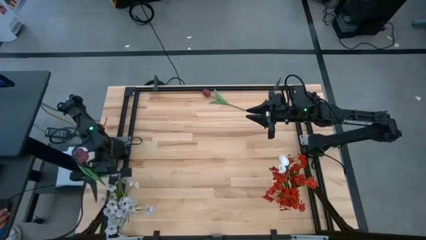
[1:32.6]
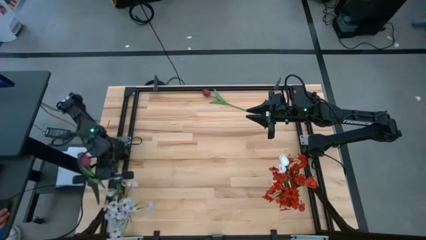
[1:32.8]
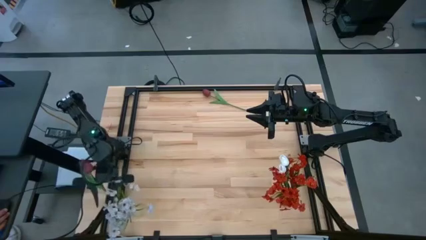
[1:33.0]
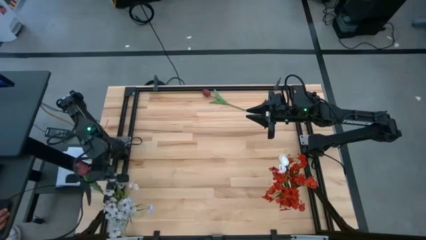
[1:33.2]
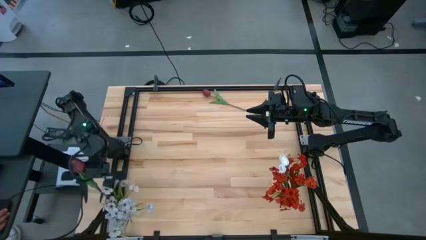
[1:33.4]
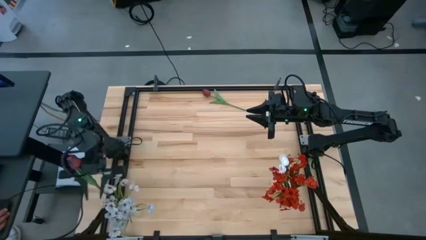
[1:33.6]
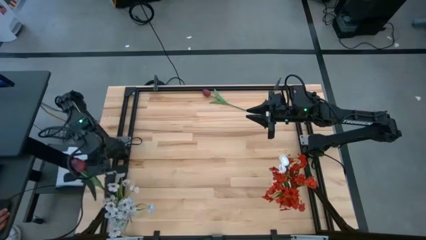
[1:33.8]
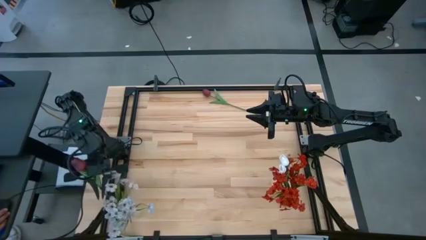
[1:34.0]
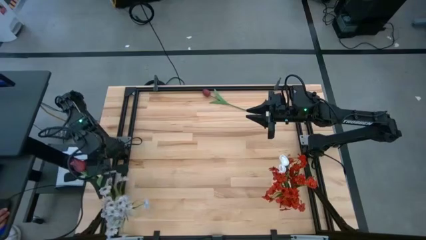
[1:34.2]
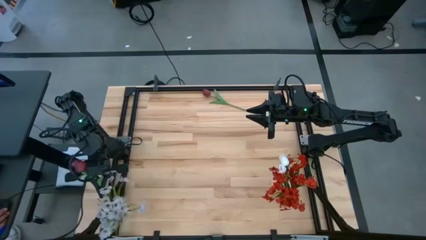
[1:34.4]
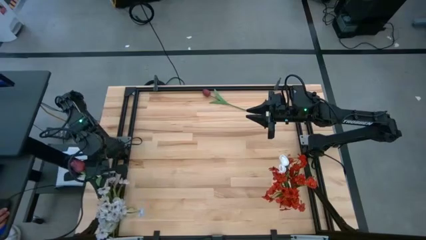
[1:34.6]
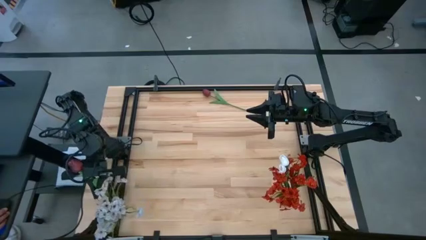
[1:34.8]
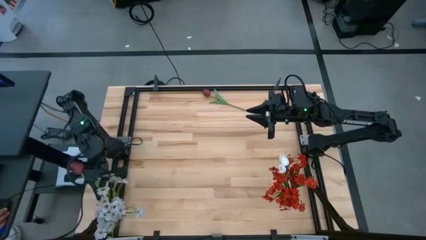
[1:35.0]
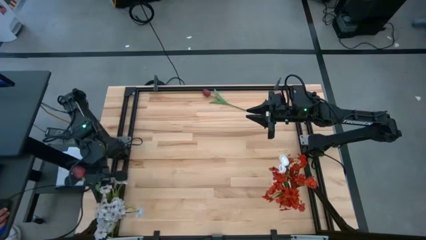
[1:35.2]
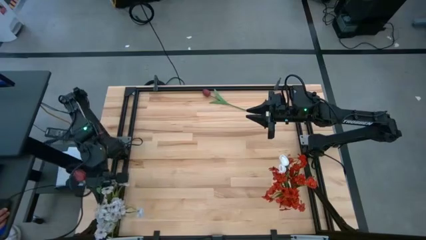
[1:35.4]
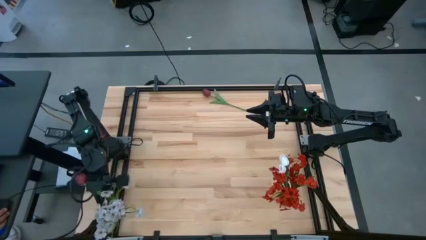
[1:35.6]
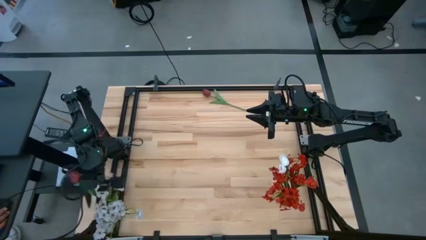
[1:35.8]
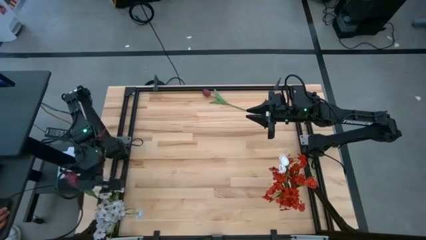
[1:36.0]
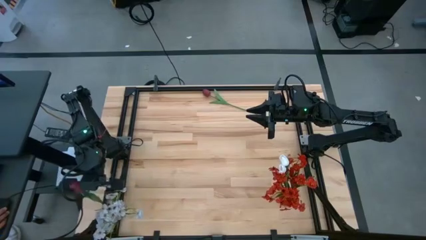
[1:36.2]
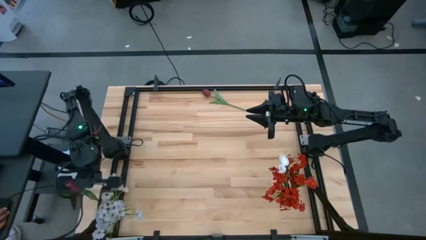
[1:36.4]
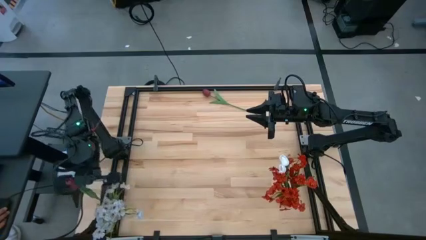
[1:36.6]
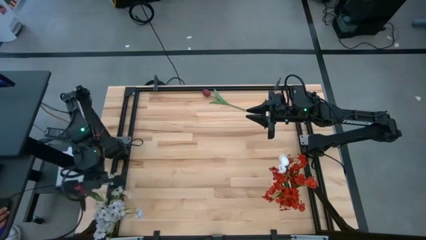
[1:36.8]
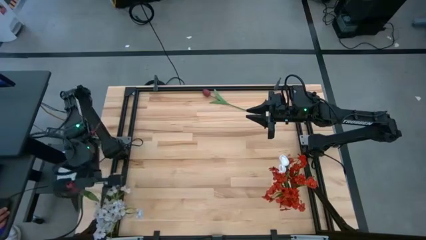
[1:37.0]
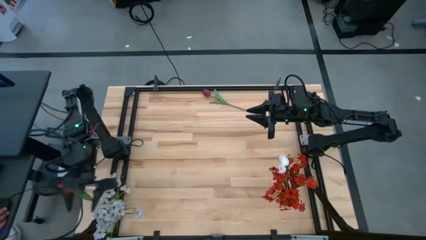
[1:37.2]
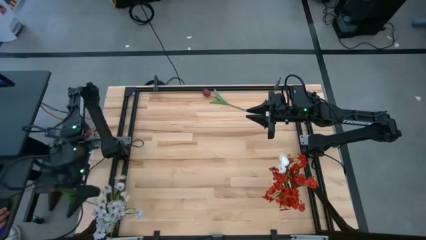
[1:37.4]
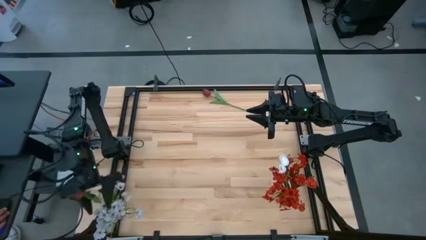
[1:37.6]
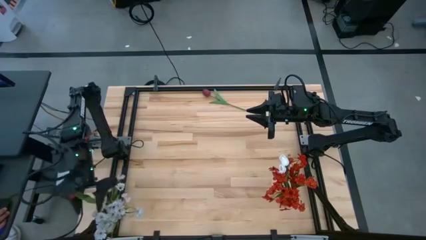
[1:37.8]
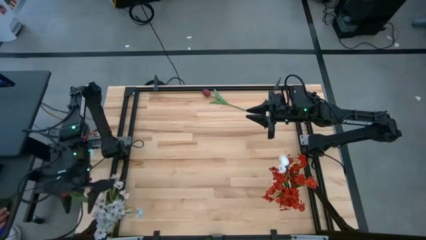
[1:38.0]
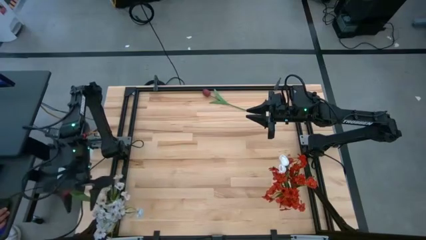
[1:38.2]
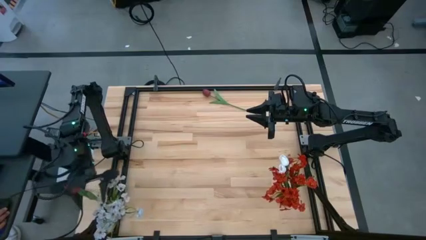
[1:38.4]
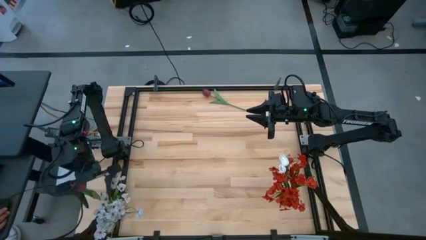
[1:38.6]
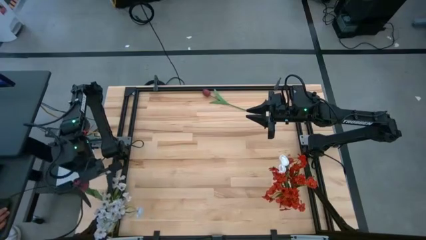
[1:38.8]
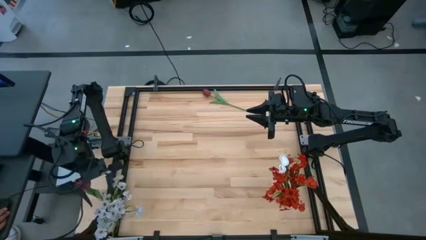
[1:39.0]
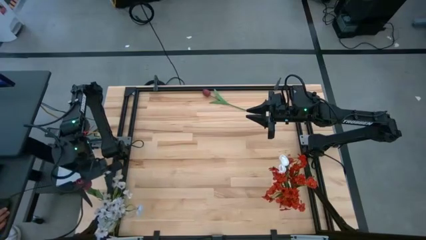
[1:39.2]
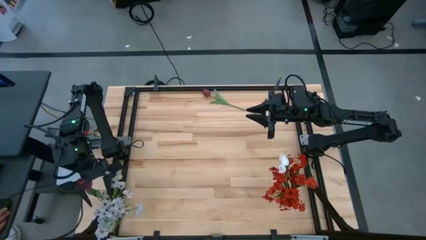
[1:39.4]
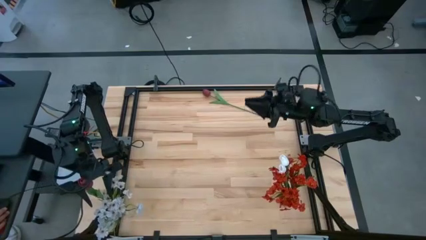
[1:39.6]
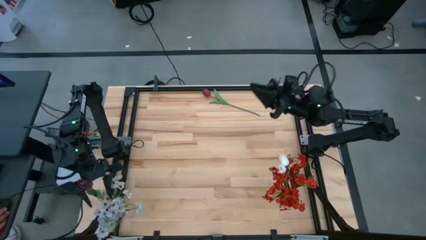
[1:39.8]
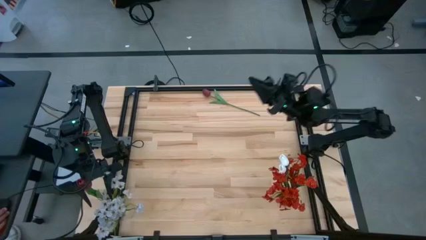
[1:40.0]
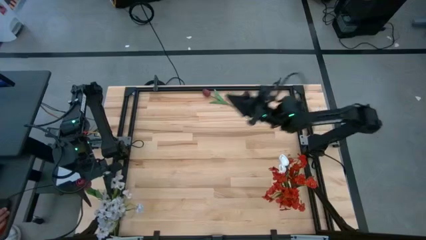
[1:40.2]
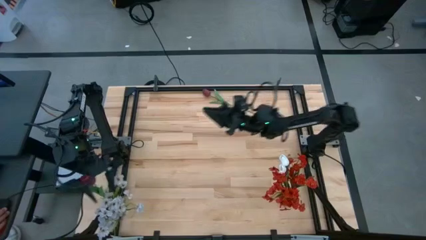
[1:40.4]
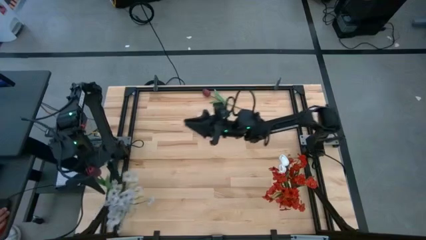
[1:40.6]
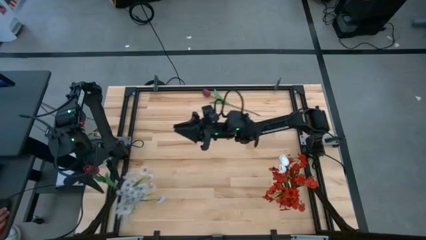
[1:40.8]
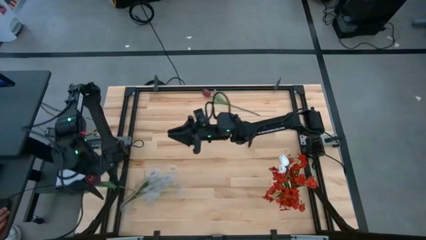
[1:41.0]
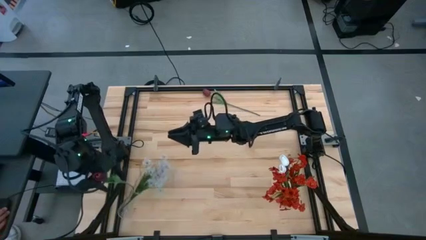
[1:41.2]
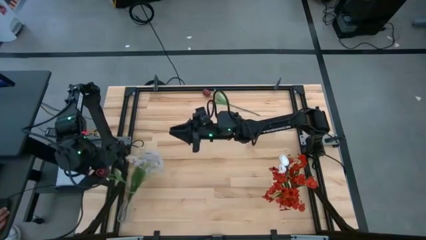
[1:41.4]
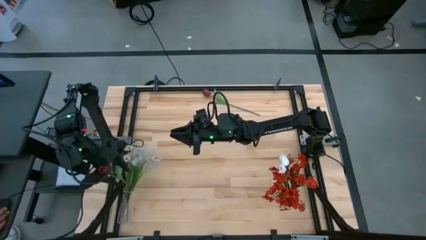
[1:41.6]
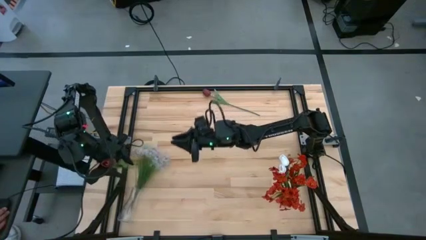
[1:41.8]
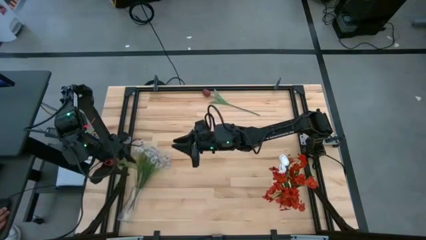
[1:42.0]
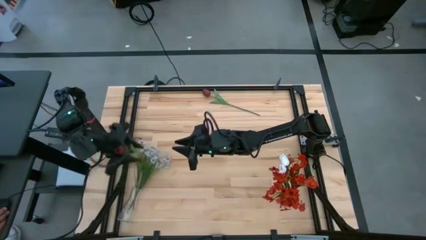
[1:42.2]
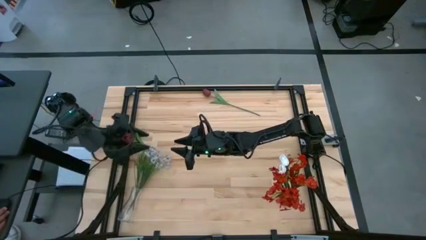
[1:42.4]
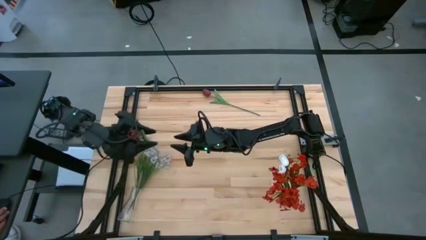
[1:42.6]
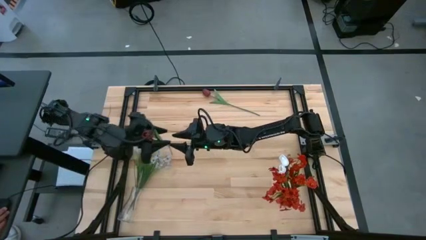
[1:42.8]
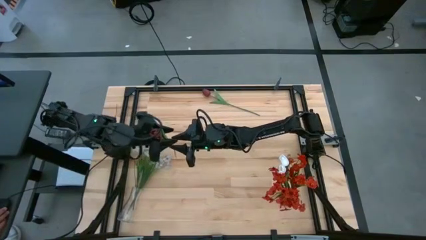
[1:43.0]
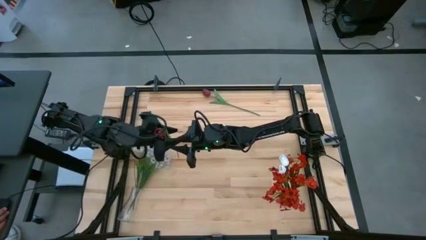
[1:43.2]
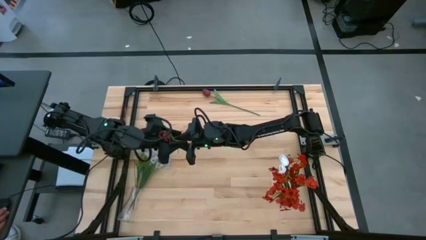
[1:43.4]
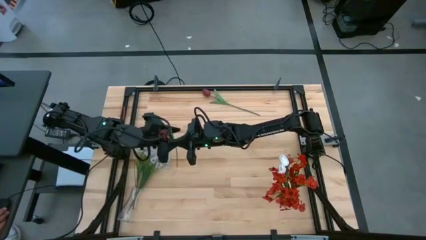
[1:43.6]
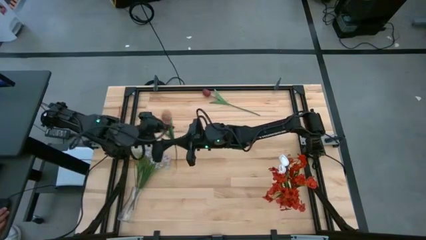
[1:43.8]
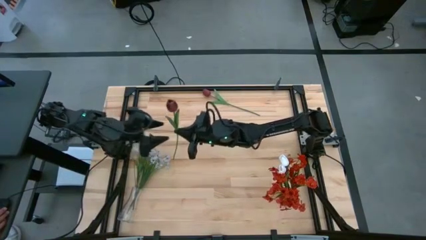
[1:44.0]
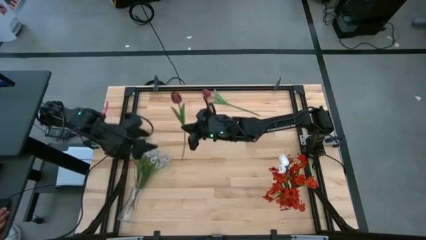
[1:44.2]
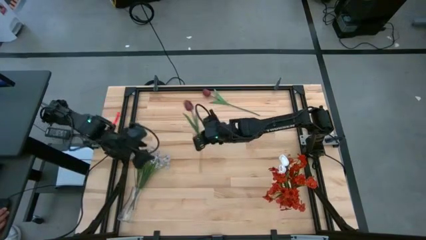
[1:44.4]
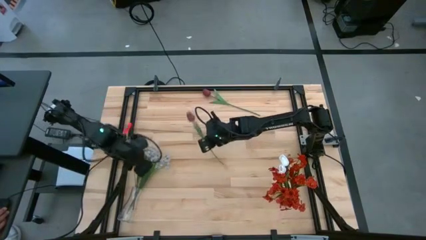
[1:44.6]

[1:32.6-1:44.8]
Task: Sort flowers into vase by color
Put the bottom red flower into the transparent vase

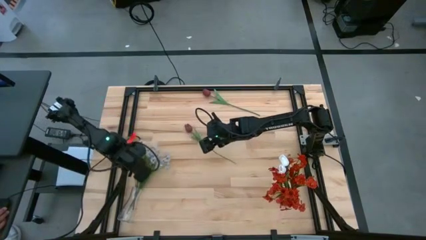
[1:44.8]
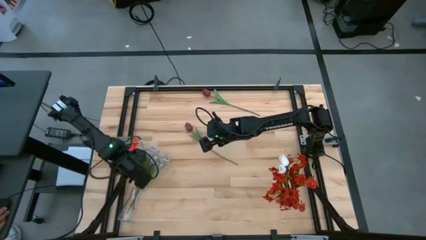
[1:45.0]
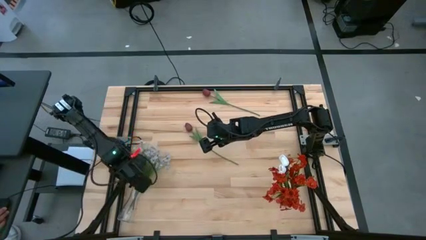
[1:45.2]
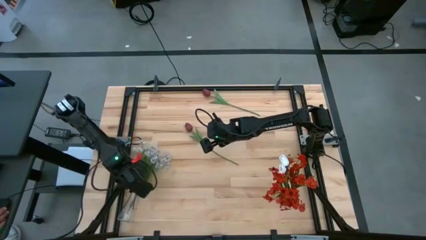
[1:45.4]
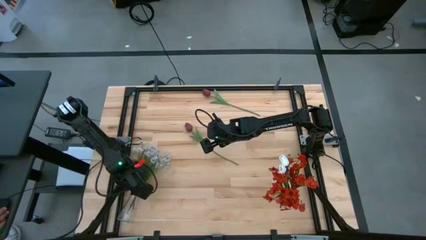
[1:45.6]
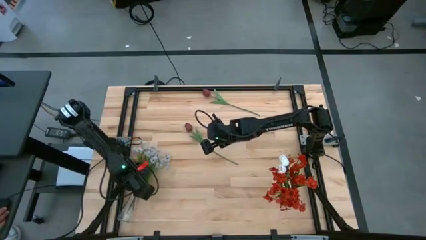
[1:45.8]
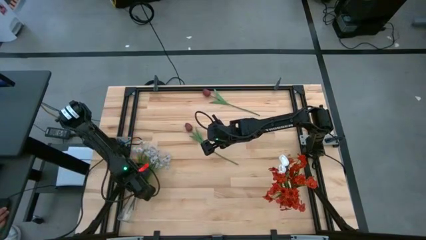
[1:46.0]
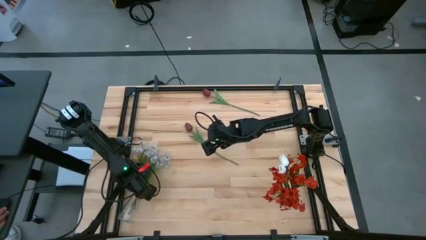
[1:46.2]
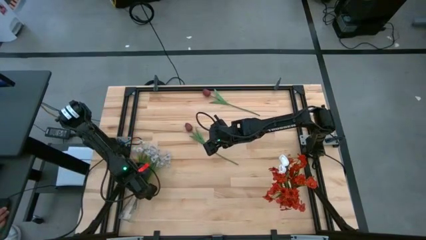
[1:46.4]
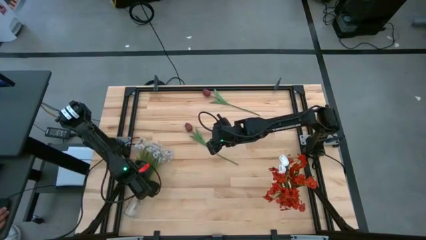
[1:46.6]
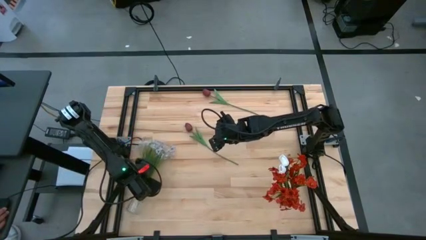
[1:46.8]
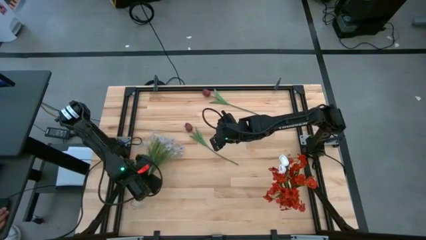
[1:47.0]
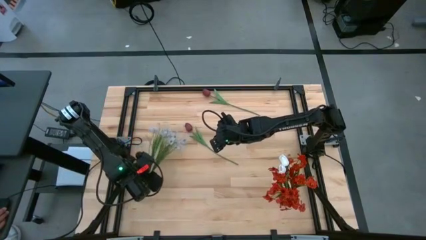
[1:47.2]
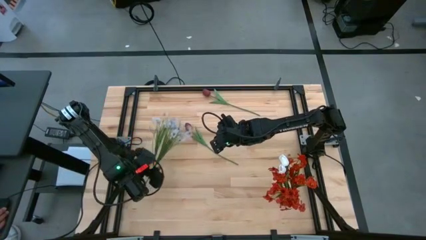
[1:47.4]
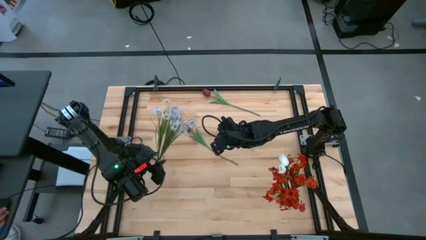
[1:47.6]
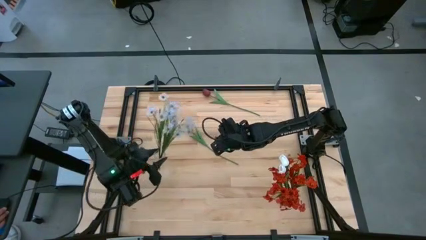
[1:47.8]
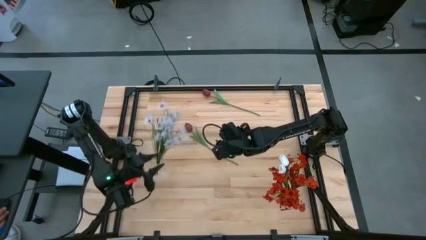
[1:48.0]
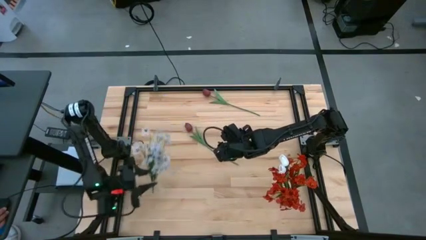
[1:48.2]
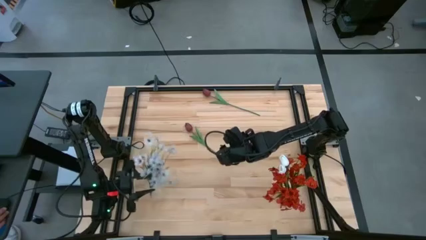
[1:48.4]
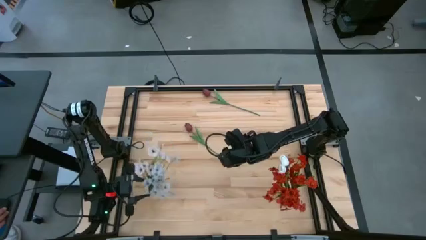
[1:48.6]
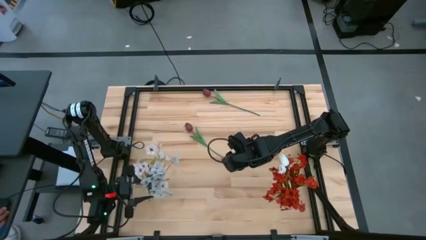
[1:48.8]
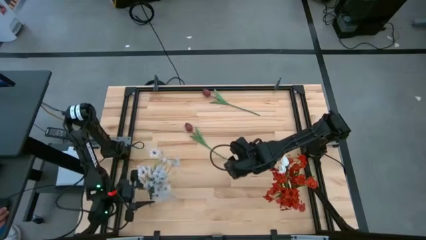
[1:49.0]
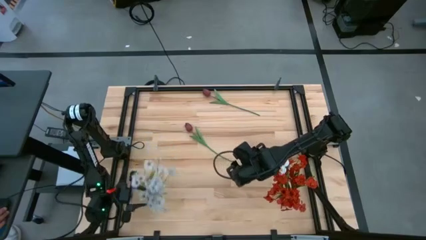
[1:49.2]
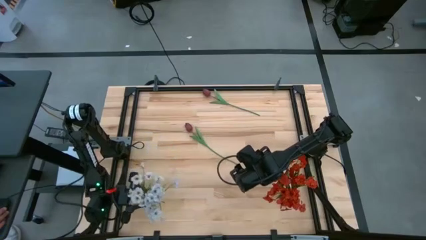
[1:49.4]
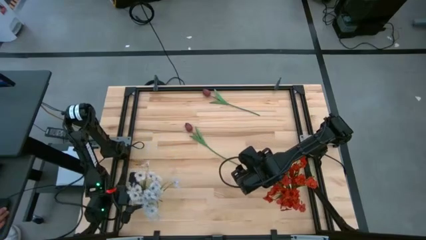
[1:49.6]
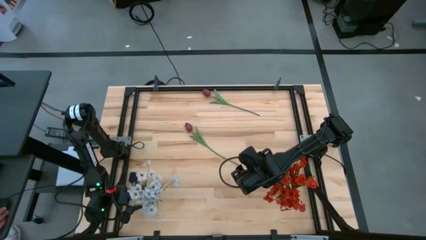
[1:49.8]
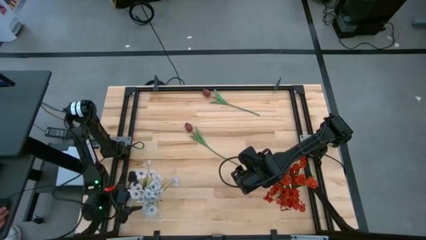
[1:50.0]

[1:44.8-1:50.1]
Put the fallen vase upright
